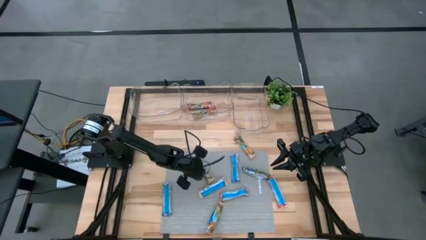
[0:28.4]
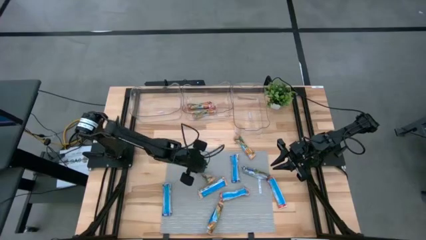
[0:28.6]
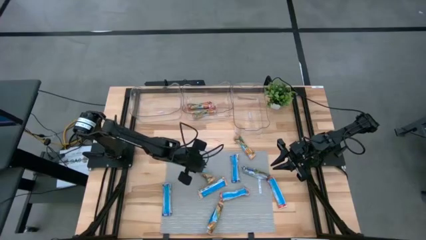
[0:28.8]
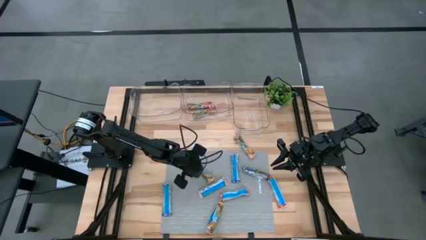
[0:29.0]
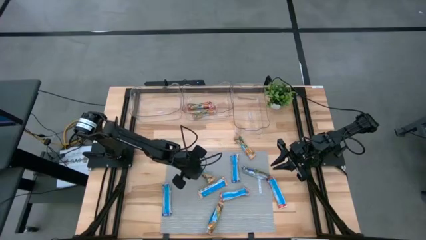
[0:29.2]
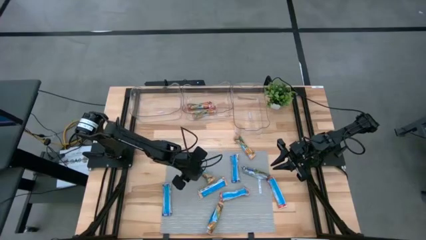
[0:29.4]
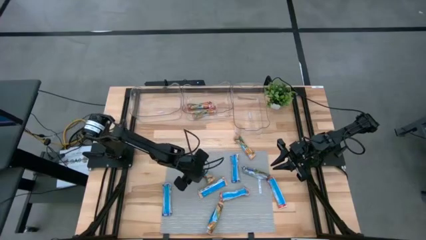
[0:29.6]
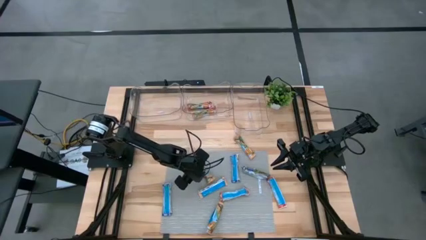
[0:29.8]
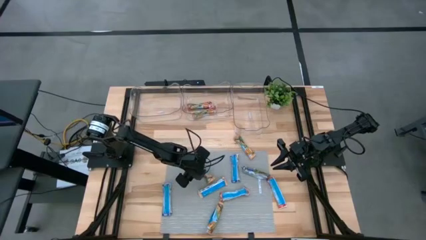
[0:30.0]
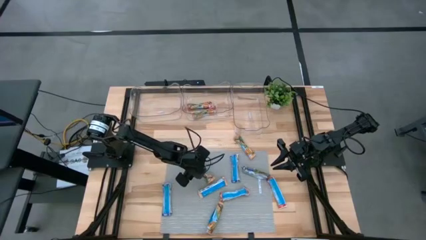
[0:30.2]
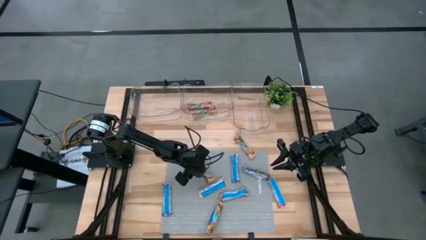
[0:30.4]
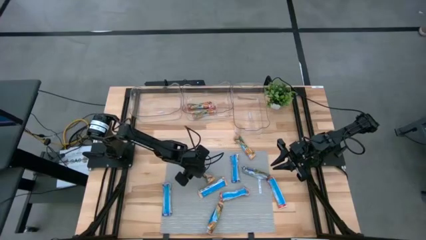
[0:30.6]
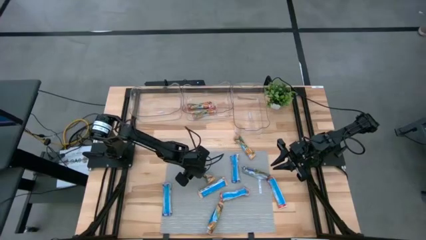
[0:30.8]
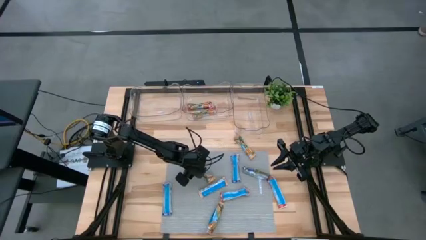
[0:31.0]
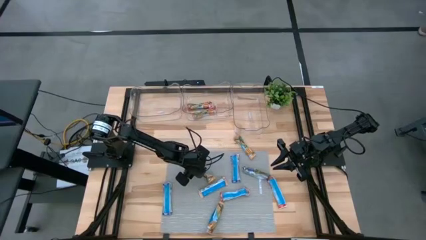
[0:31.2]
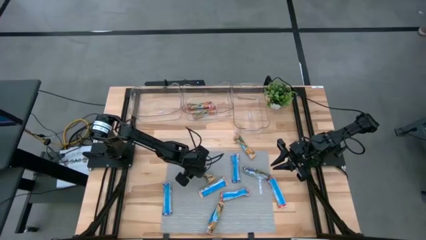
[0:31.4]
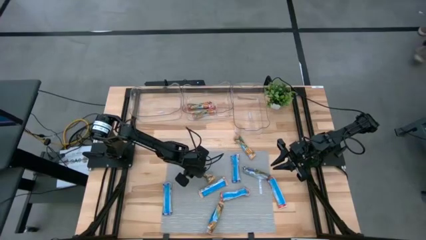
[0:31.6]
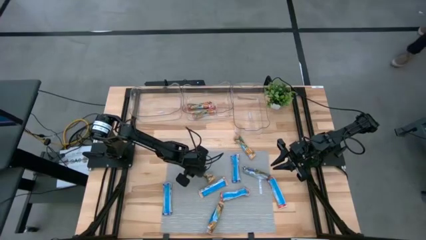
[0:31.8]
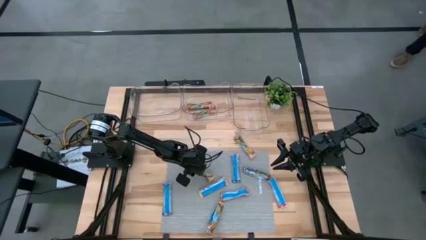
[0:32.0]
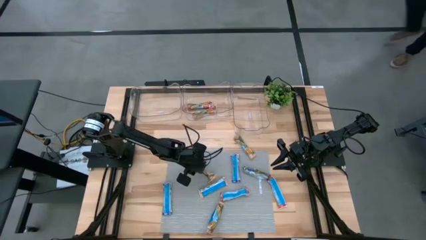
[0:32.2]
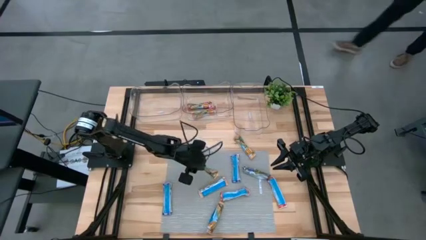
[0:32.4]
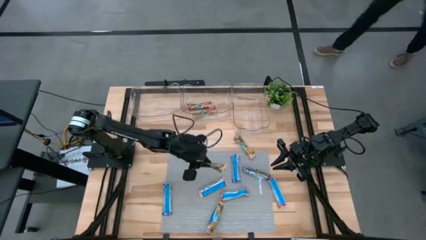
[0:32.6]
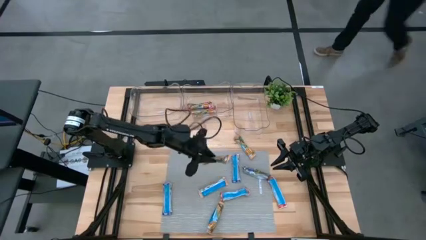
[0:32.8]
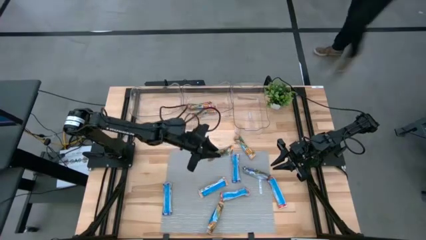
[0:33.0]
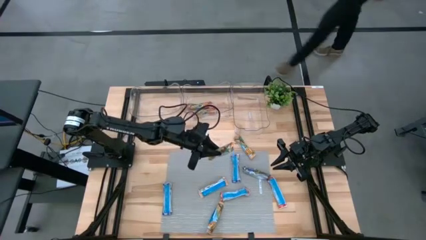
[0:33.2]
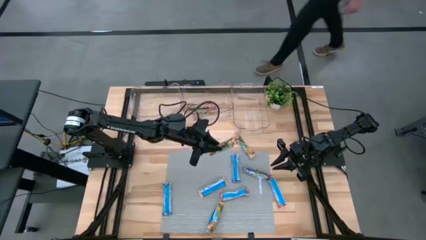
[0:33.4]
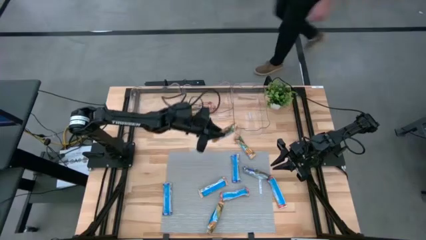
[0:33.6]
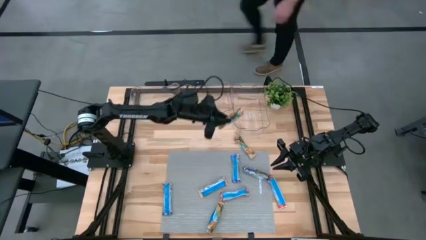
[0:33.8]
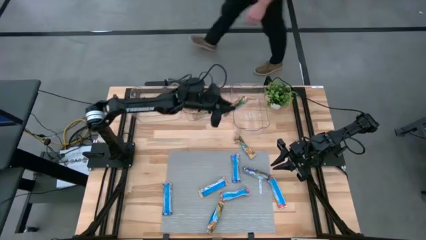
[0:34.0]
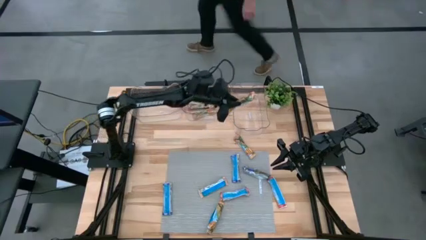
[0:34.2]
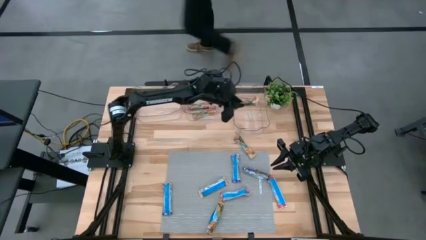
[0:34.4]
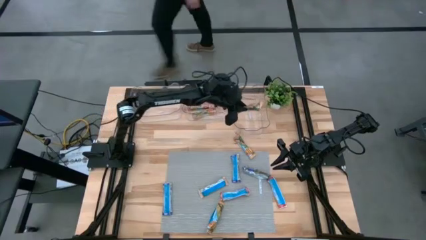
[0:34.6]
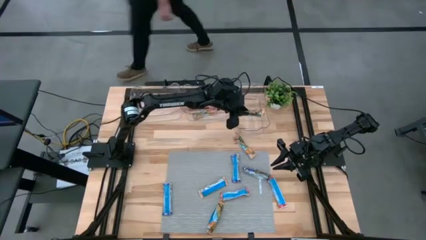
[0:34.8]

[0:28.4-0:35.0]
Task: Pick and place Granola Bars by type
Put the yellow granola bar into the right transparent bin

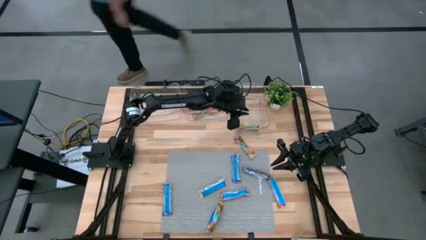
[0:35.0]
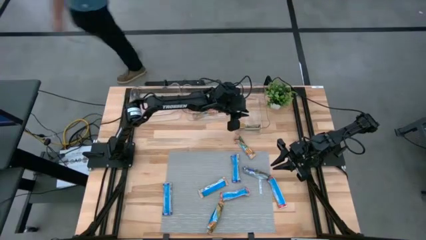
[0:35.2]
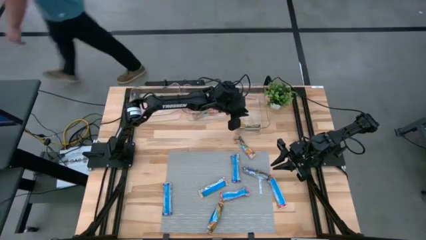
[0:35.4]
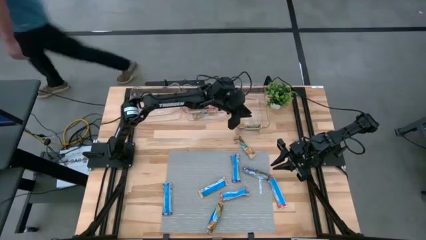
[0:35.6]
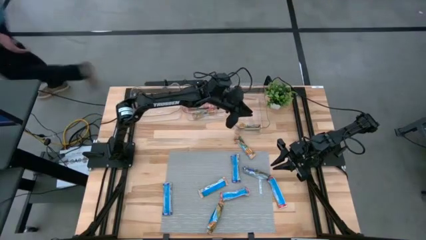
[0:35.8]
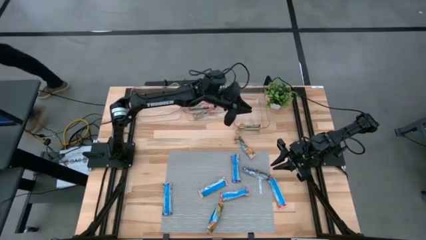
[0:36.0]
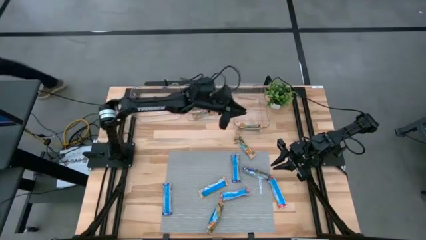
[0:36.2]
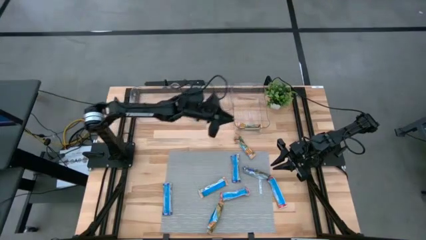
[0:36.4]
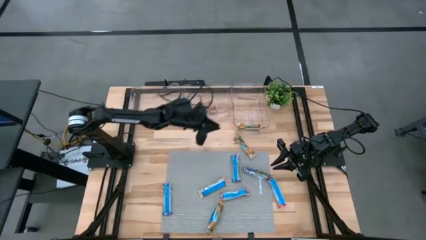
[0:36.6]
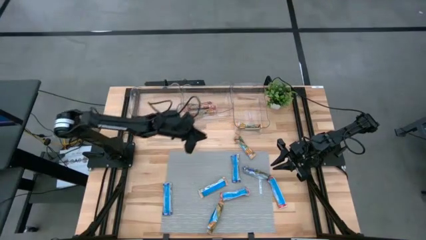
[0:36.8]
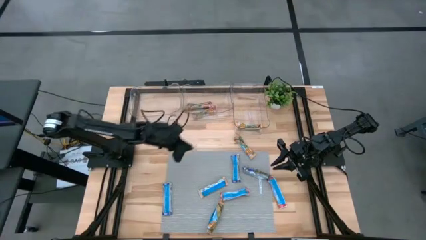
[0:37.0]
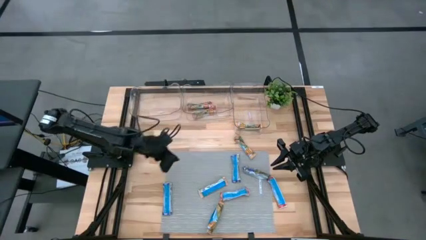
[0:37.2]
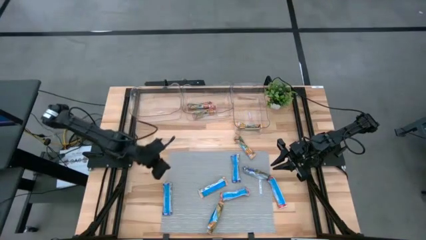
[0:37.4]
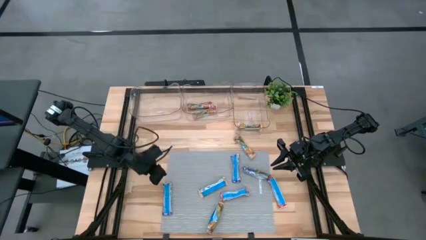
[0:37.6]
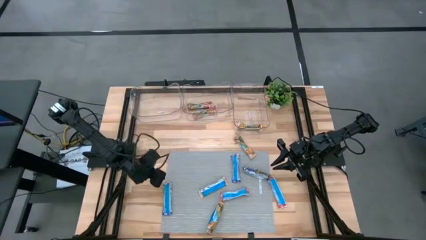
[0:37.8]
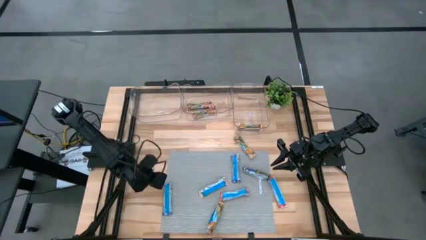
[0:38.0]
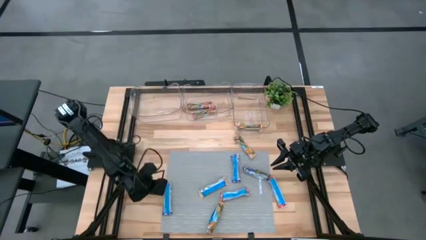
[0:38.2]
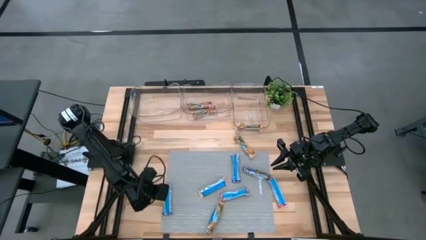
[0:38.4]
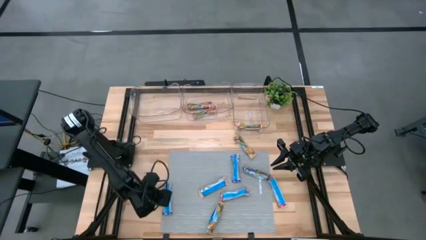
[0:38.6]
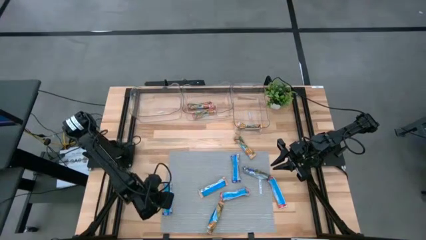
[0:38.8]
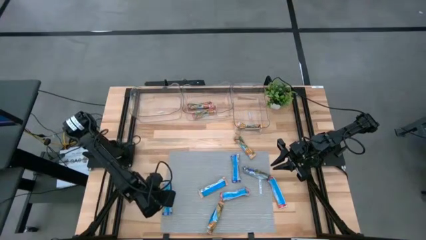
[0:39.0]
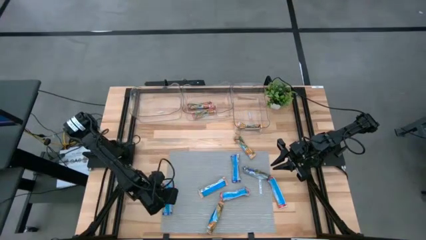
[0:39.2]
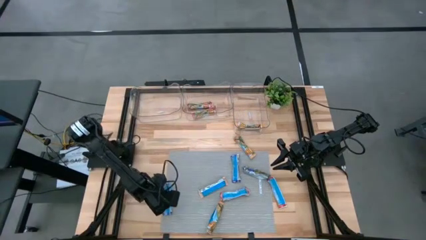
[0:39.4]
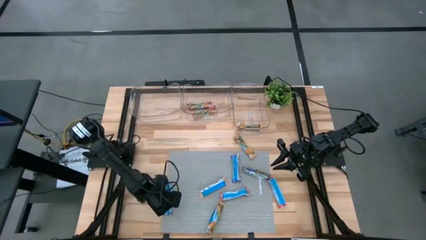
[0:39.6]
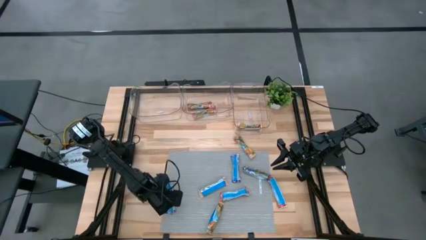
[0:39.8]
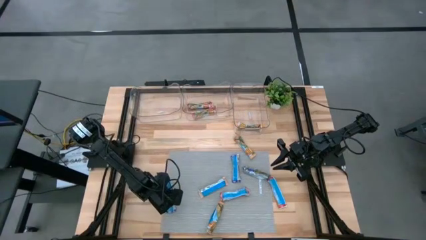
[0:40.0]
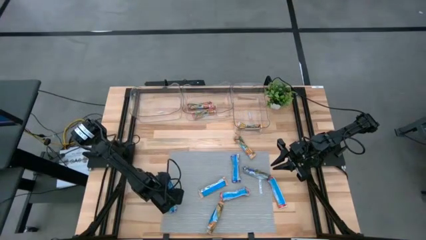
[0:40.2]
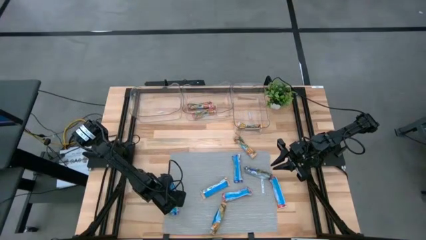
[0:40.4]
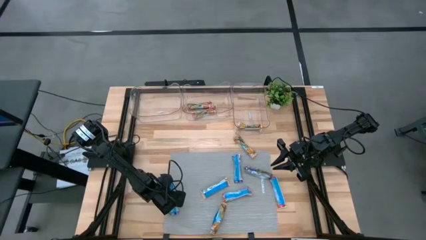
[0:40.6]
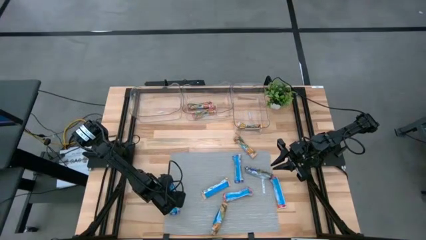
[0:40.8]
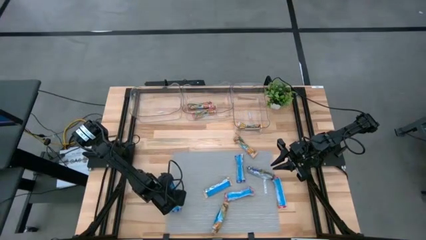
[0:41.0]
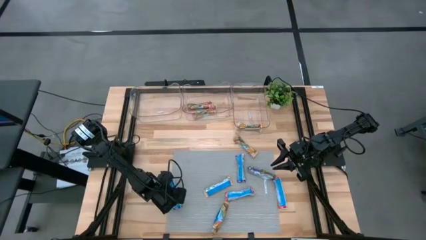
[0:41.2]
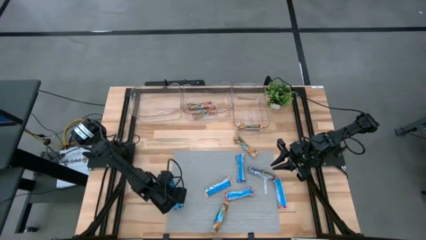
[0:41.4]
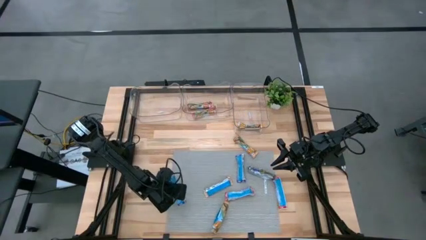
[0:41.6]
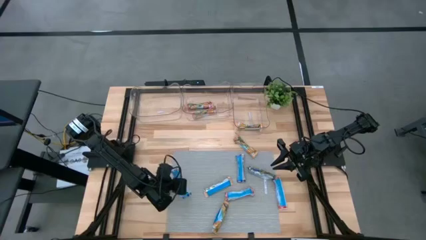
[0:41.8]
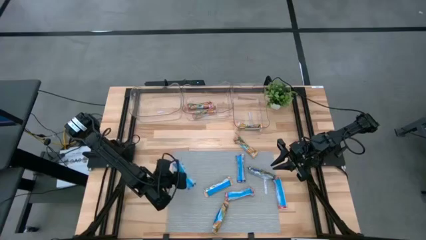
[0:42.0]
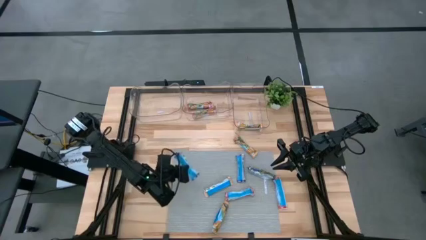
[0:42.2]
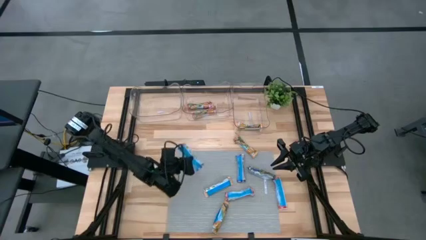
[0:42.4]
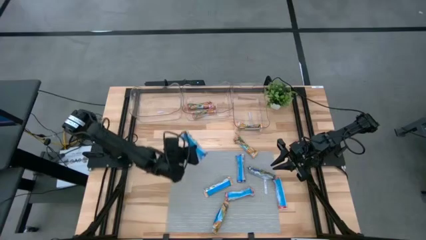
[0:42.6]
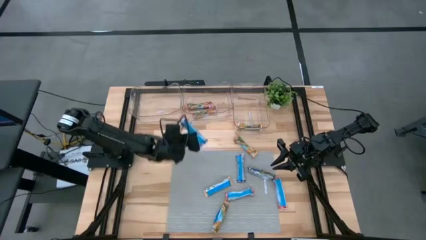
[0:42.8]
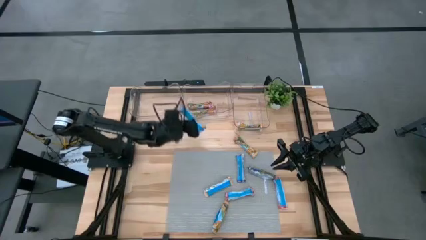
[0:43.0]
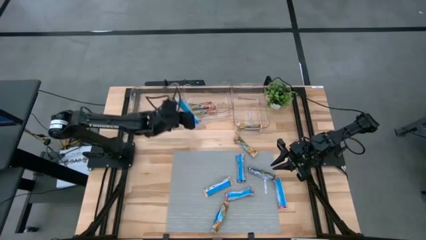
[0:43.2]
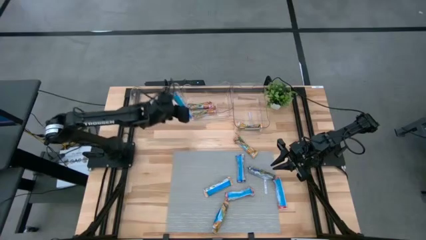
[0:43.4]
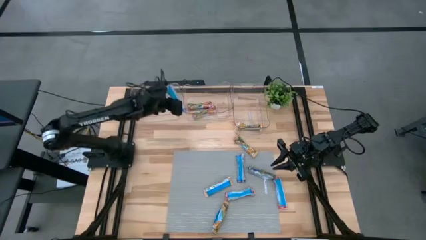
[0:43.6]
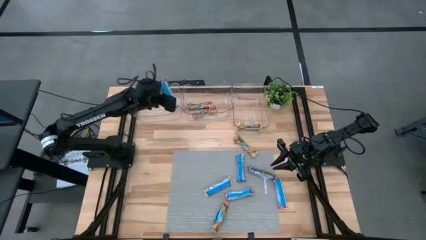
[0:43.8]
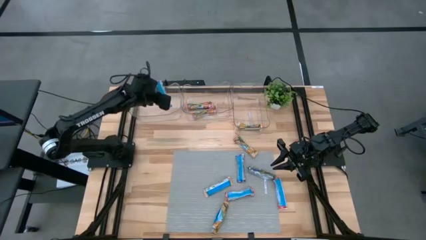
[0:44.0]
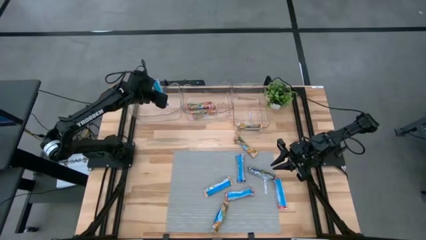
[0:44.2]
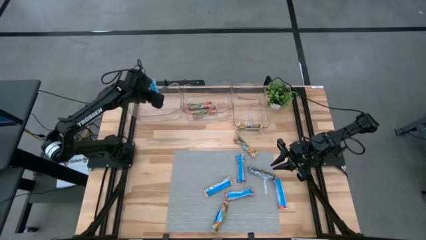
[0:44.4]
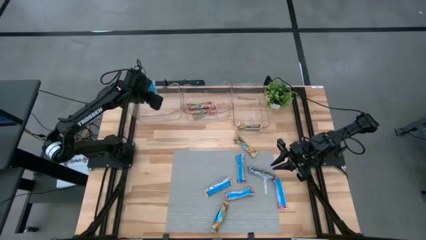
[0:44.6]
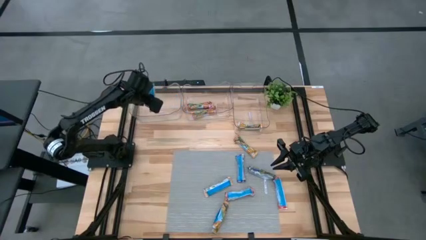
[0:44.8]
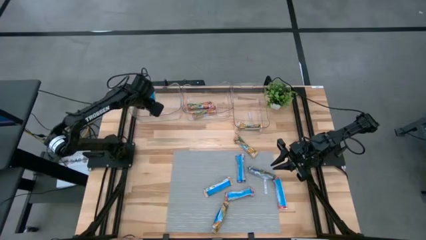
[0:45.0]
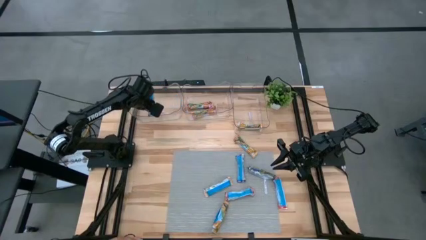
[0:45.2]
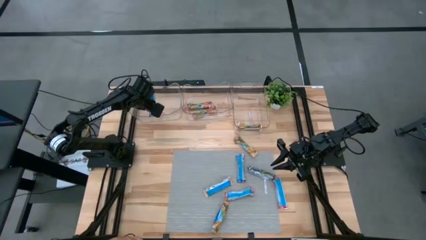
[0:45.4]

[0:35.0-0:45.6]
Put the blue granola bar into the left transparent bin
